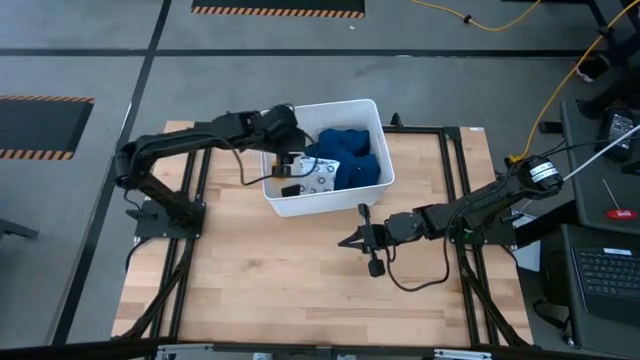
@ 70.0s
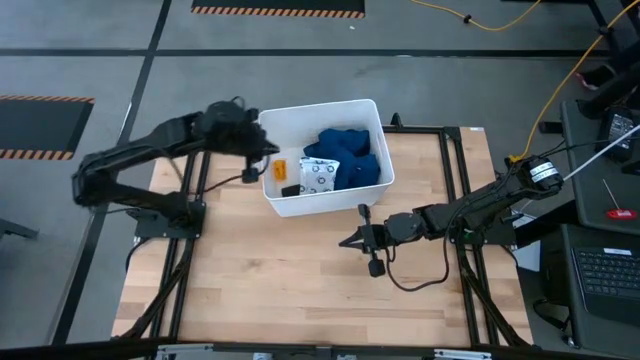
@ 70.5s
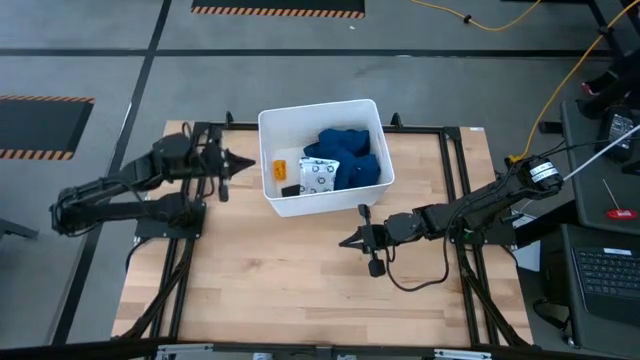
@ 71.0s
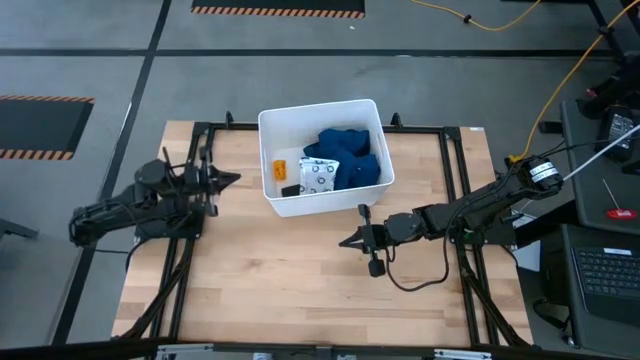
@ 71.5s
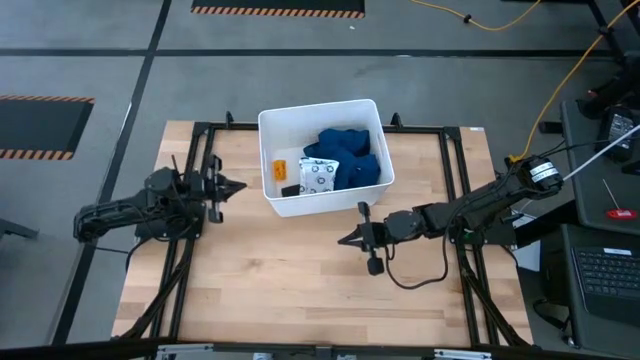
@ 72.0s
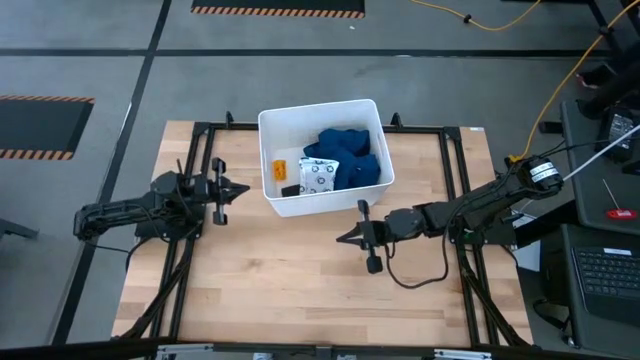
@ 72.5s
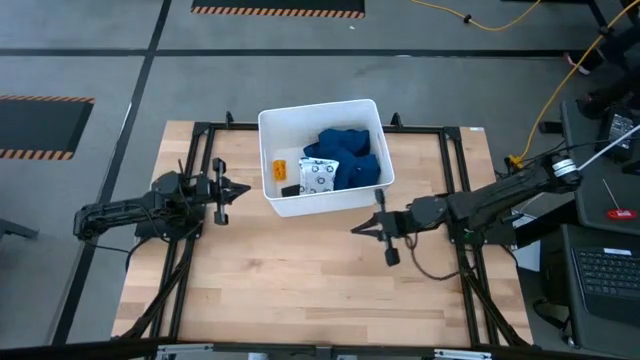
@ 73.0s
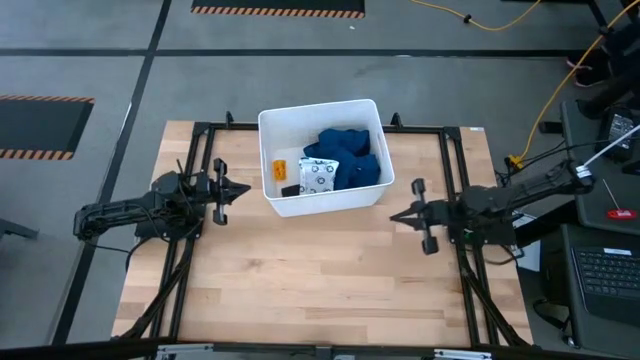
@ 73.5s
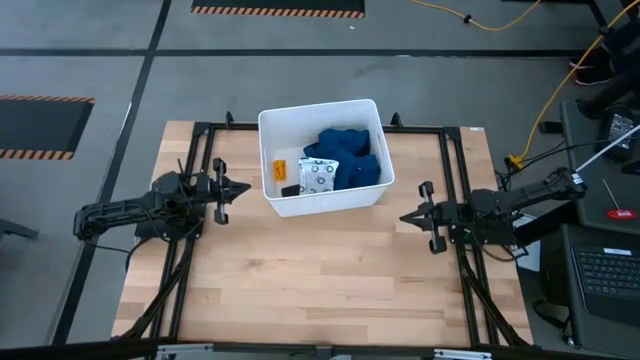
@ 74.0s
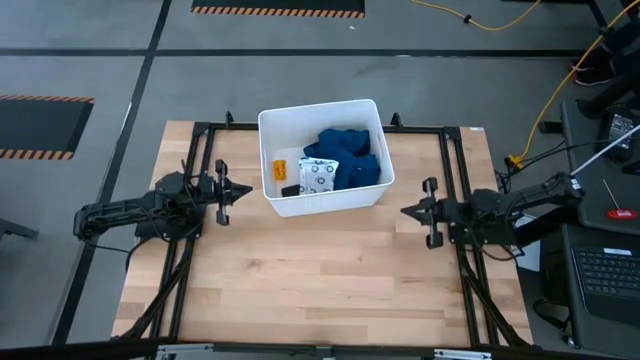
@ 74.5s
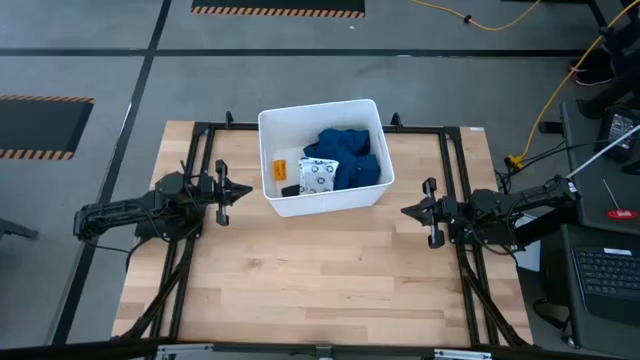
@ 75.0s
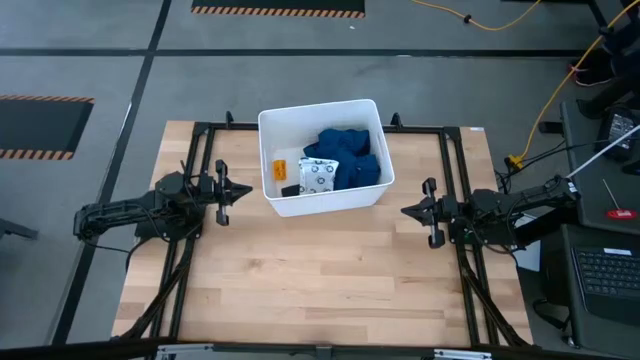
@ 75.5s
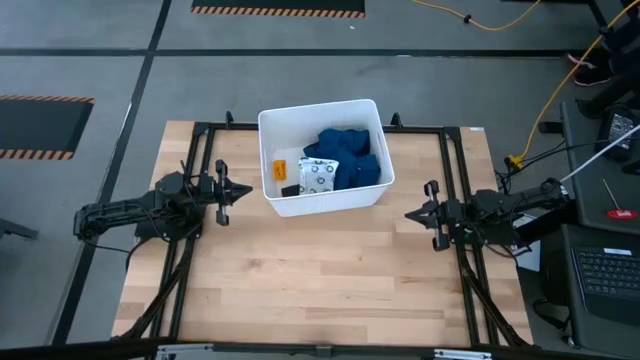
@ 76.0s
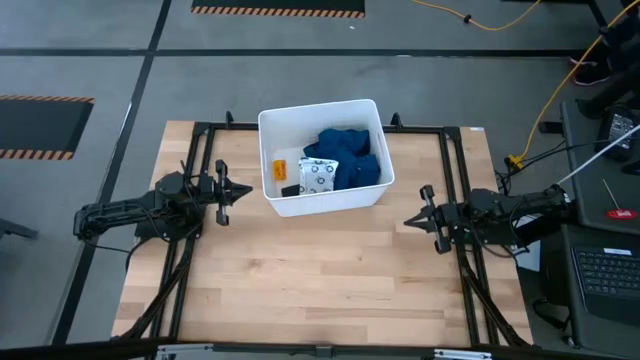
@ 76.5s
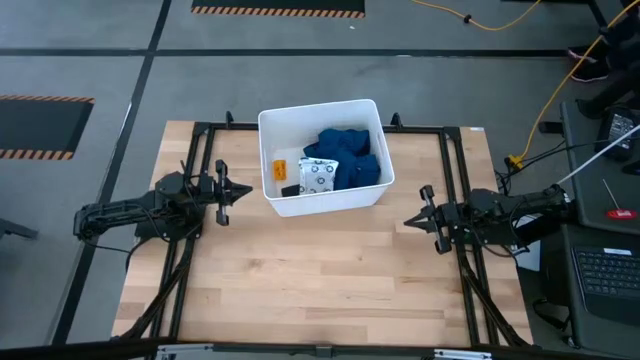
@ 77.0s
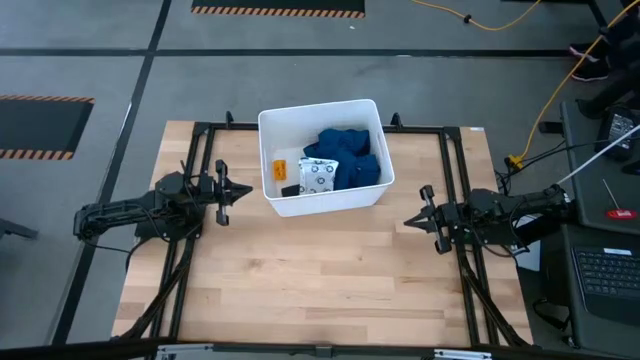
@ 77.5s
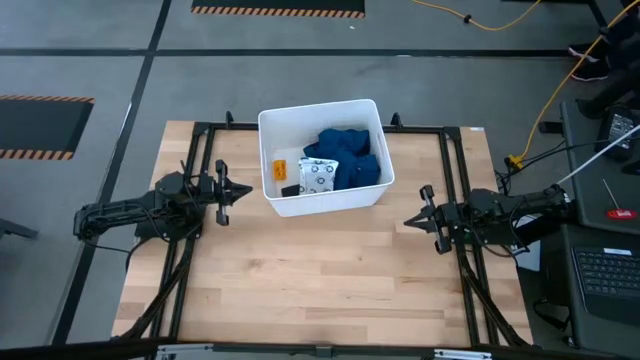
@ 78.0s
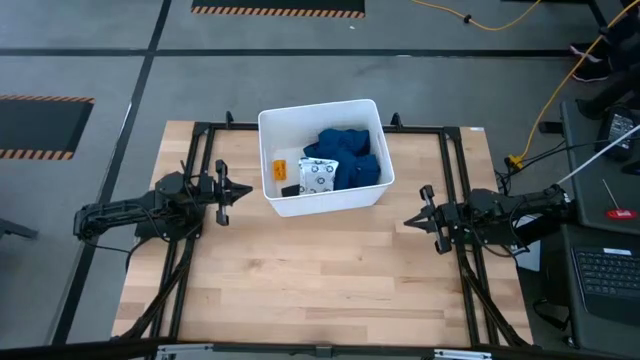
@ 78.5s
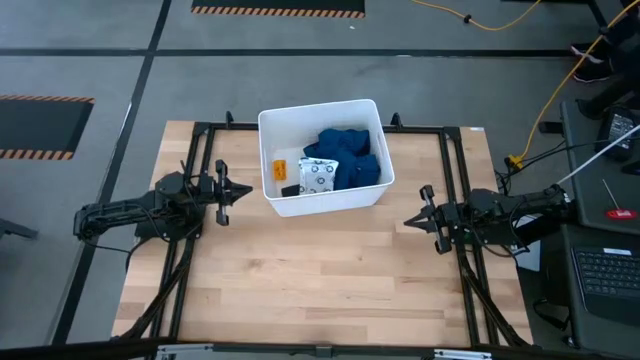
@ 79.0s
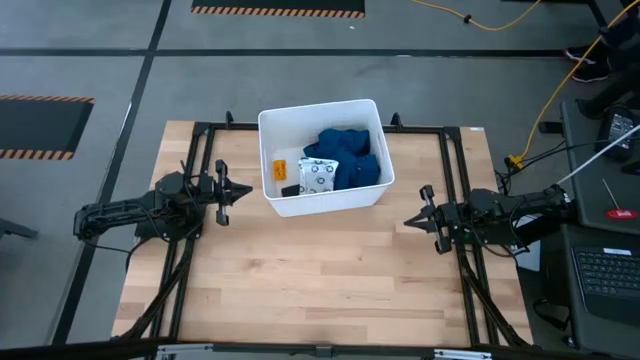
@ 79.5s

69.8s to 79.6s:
Task: Pick & place medical supplies in basket/bin
Return to Home Position

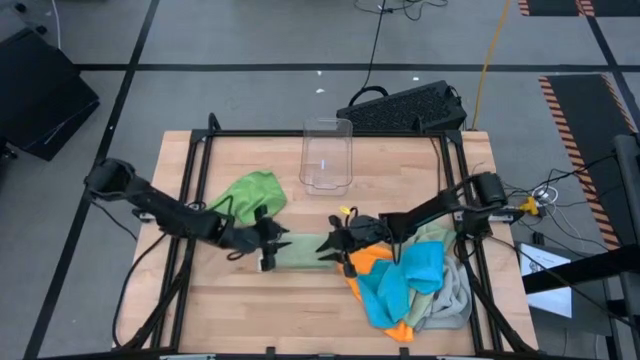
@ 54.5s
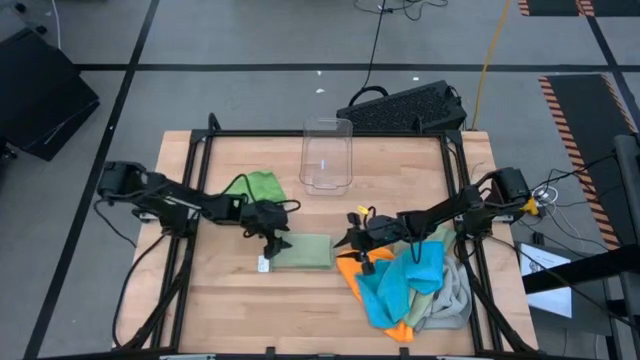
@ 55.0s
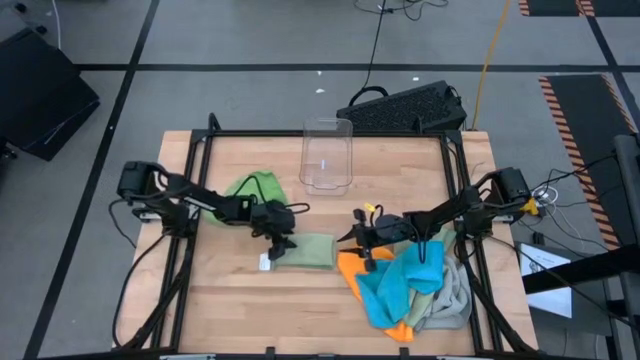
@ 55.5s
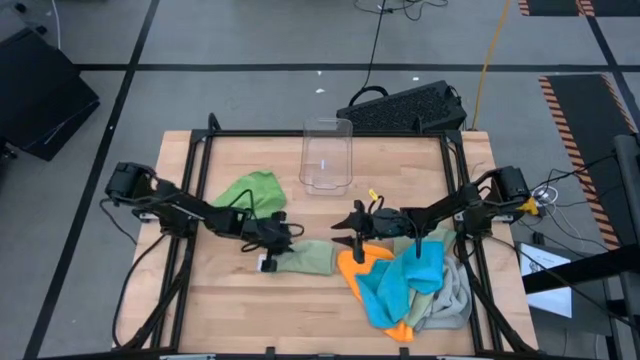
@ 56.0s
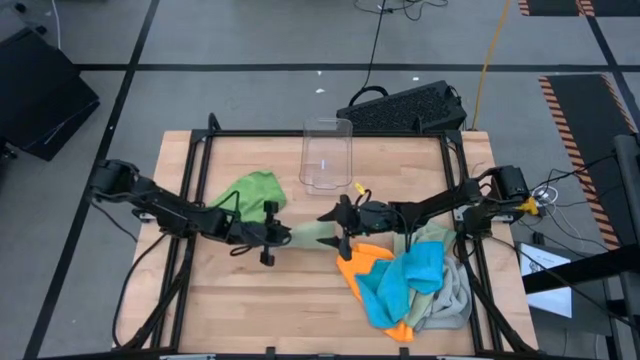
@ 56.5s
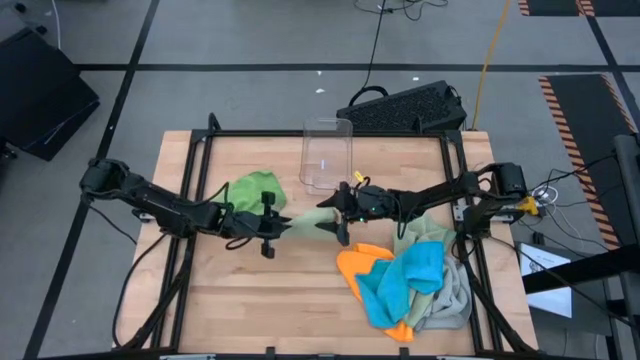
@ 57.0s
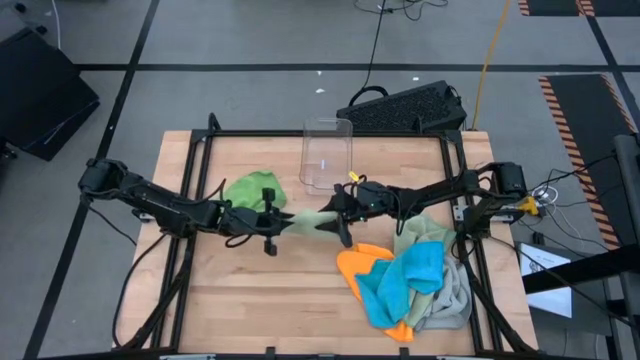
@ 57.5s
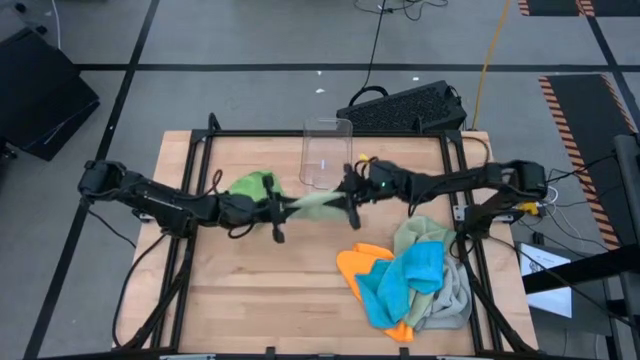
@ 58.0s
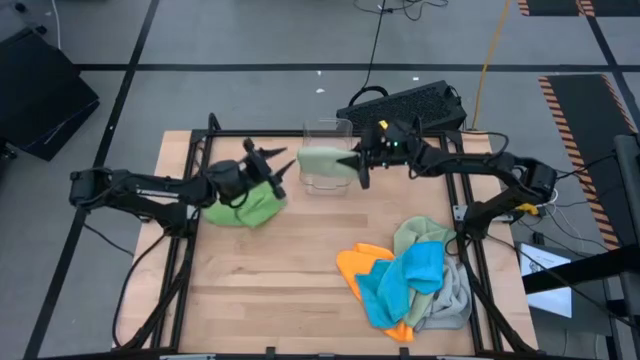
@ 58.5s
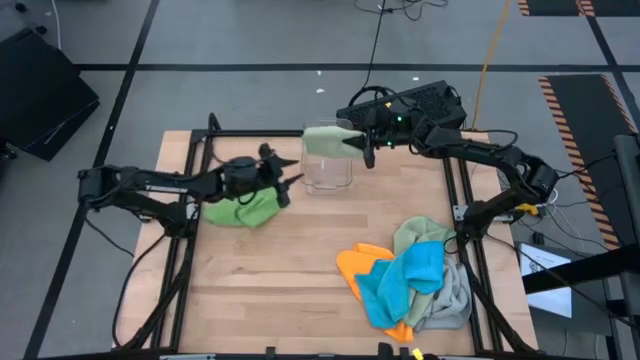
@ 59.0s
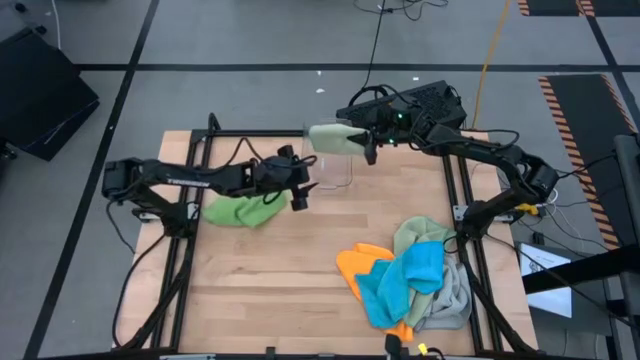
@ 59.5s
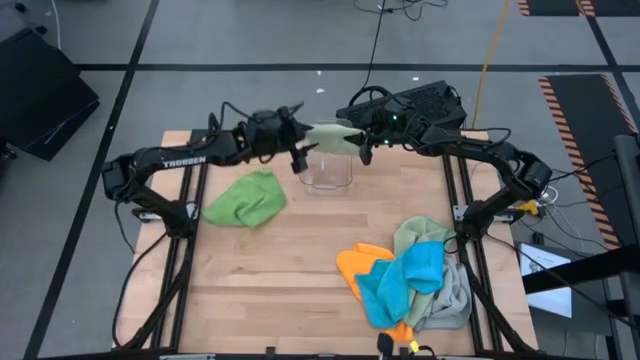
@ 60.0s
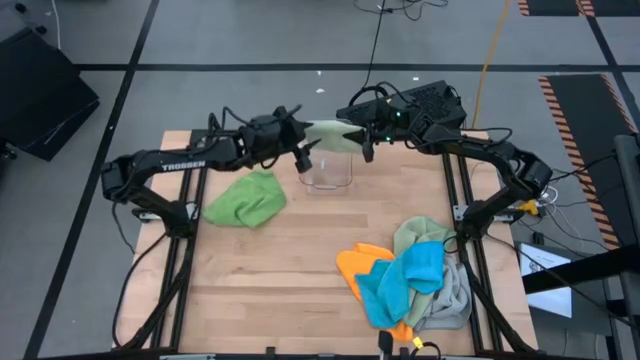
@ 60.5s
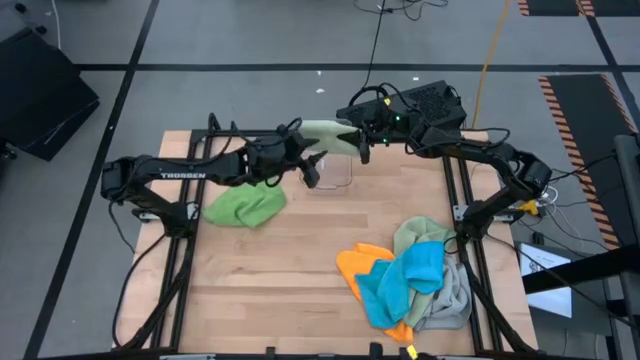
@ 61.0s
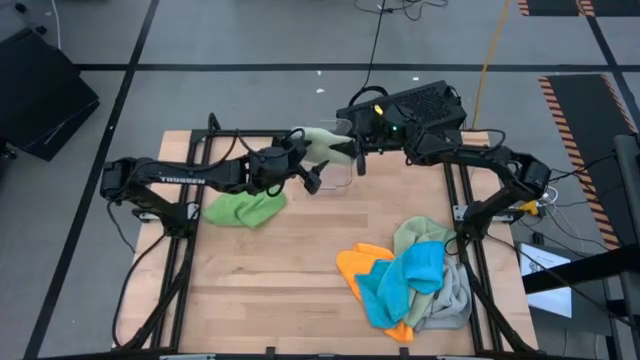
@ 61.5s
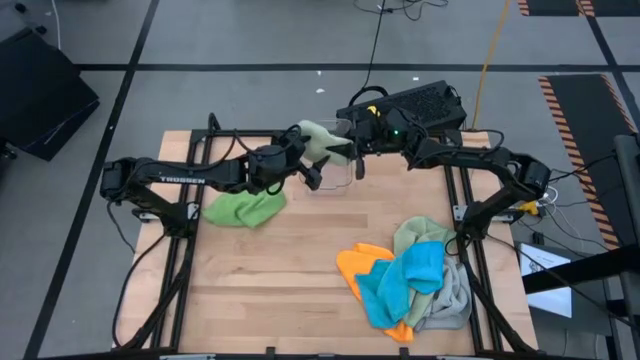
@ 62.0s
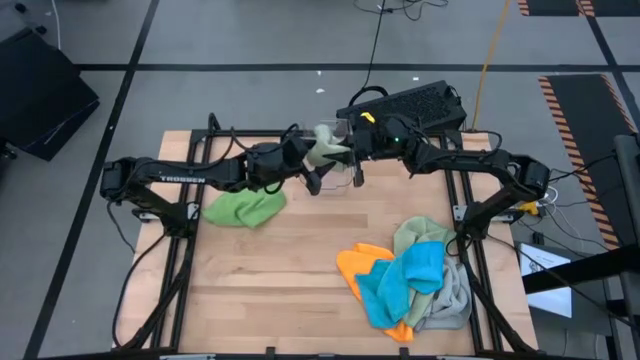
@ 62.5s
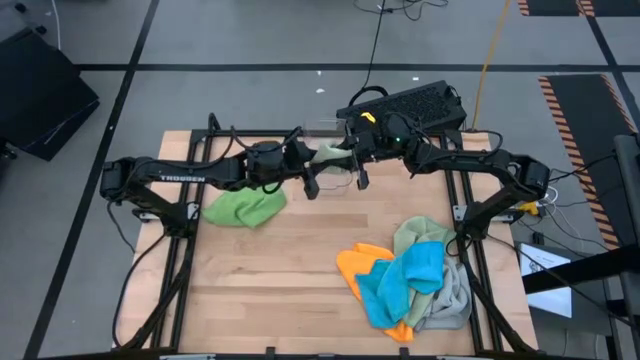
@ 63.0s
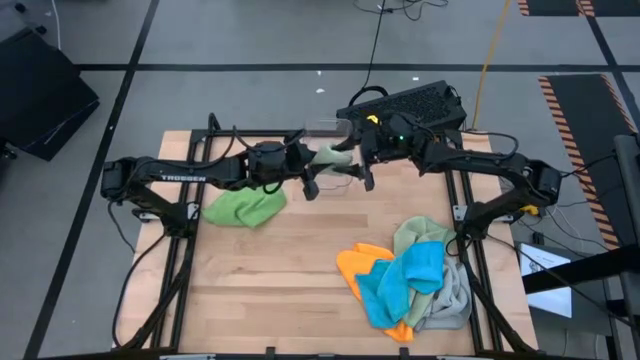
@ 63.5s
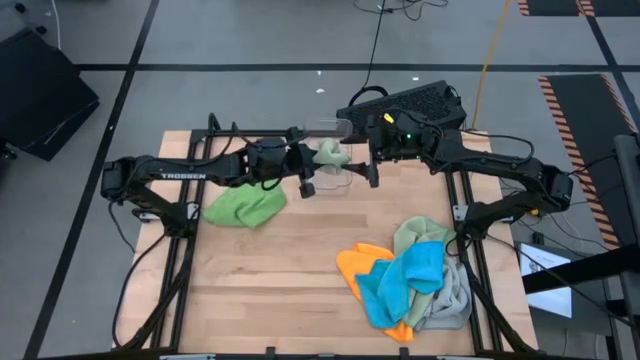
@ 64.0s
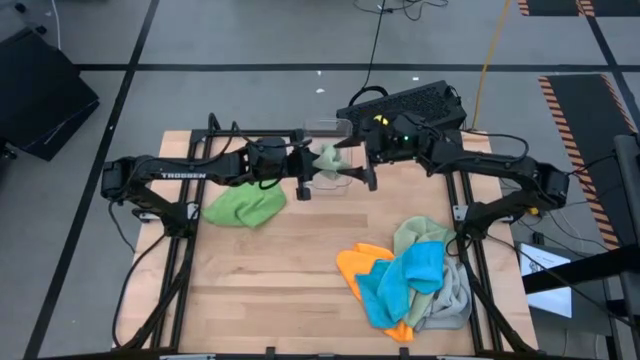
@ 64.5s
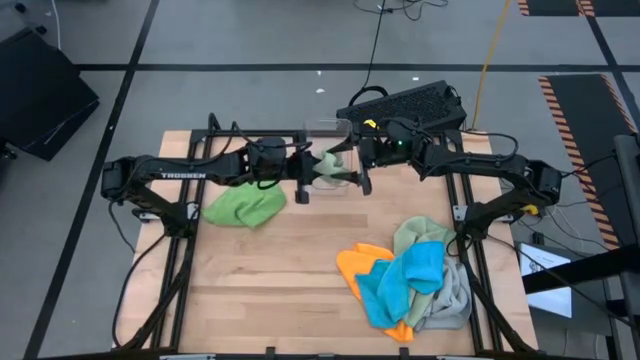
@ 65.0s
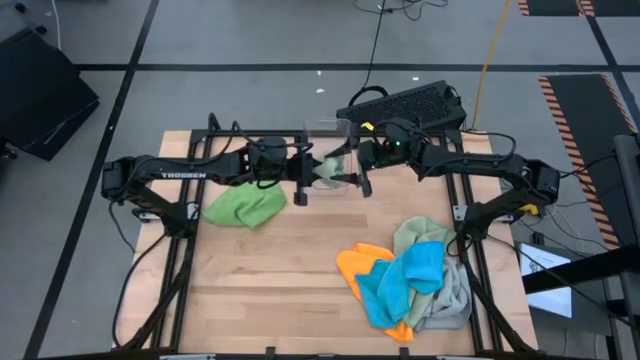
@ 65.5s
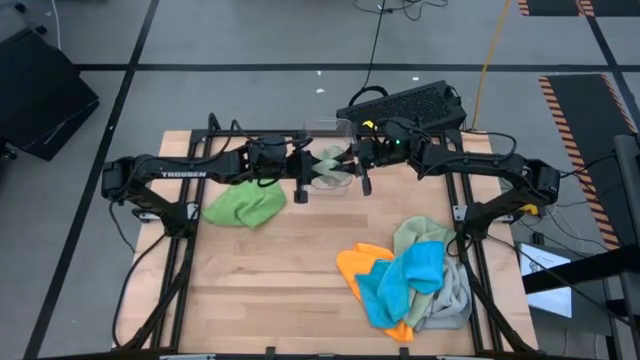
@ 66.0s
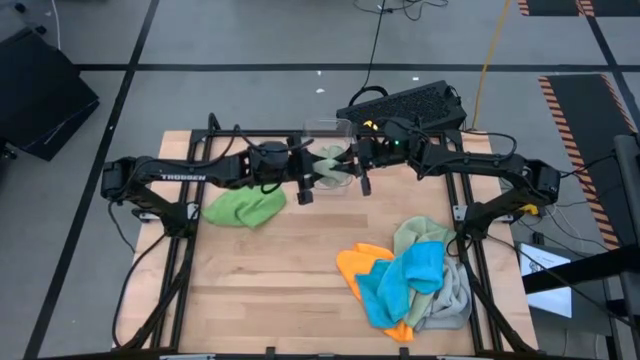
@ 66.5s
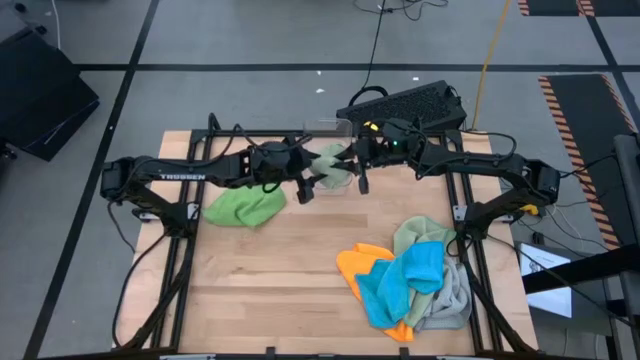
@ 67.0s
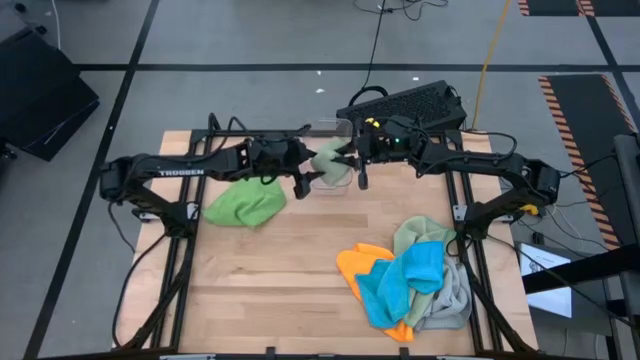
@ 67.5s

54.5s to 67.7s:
Task: Fold microfiber towels
Put the folded light green towel into the transparent bin
